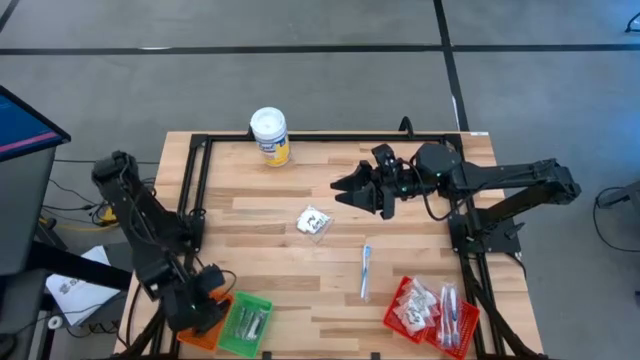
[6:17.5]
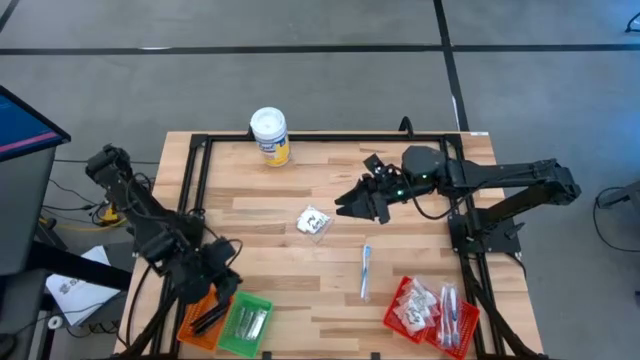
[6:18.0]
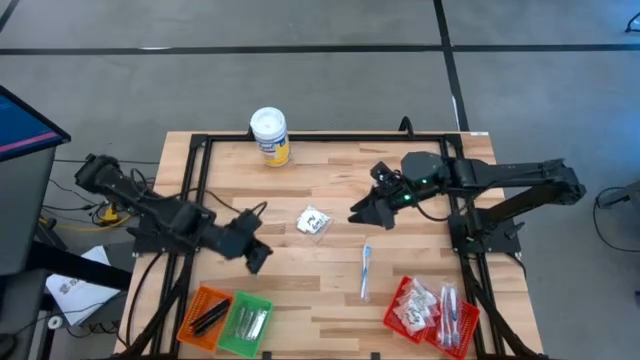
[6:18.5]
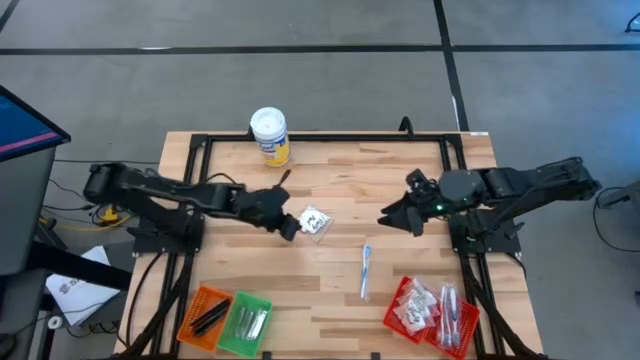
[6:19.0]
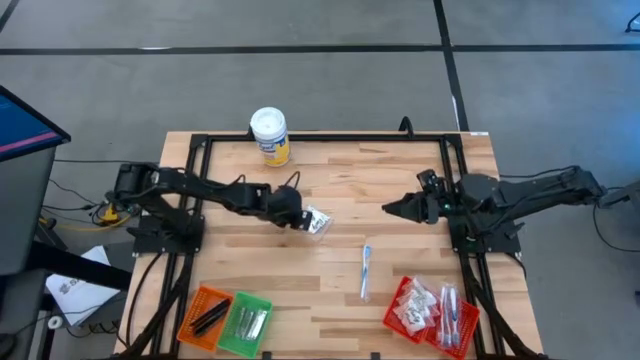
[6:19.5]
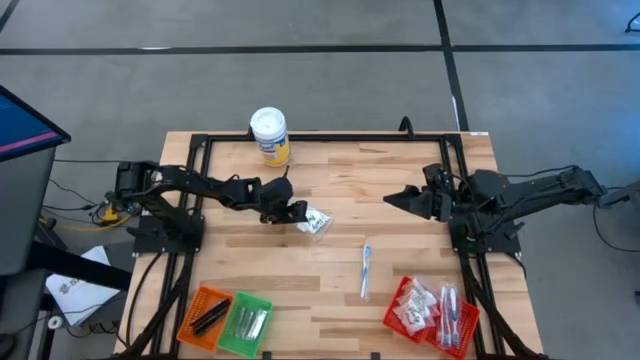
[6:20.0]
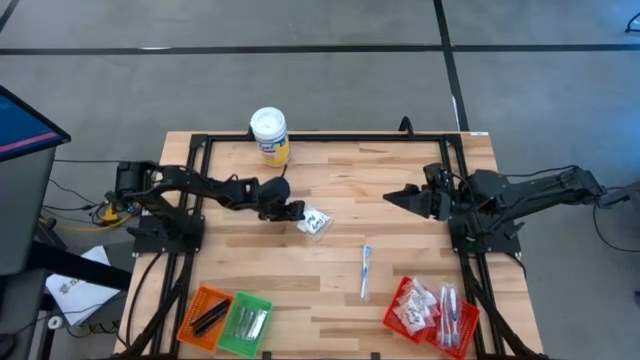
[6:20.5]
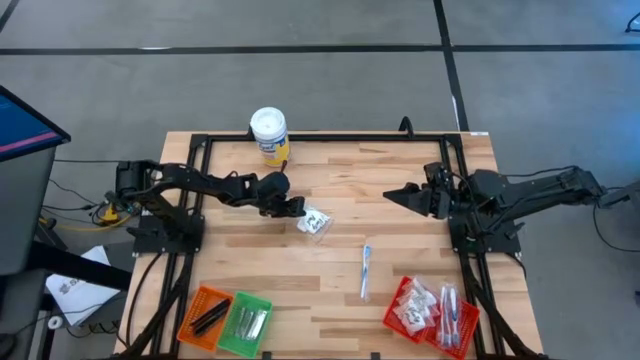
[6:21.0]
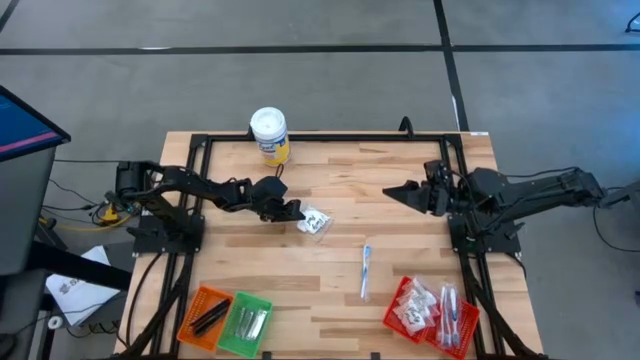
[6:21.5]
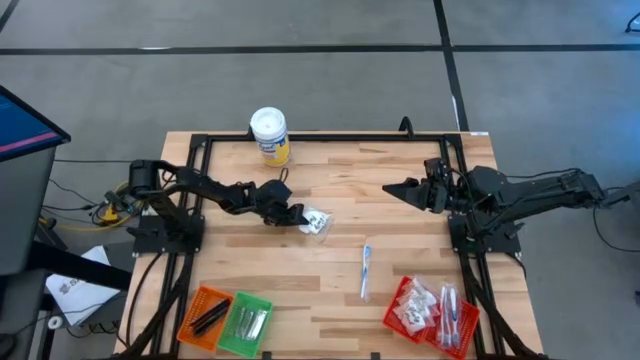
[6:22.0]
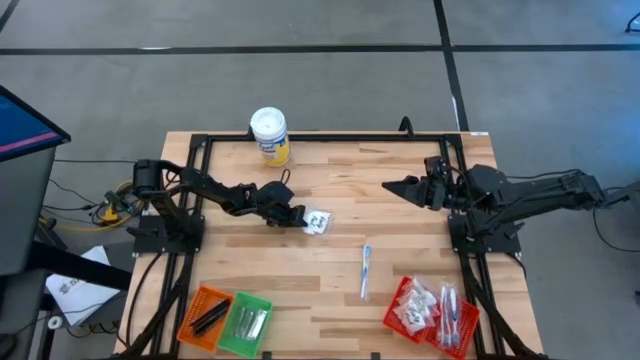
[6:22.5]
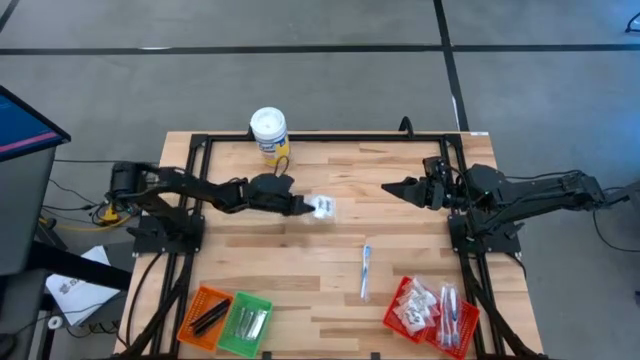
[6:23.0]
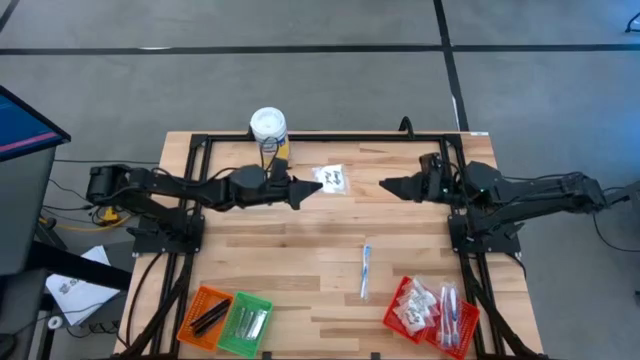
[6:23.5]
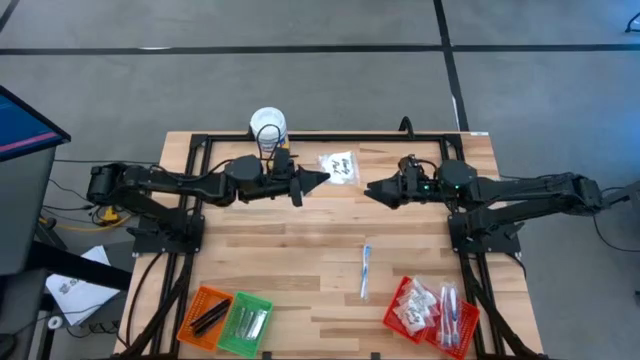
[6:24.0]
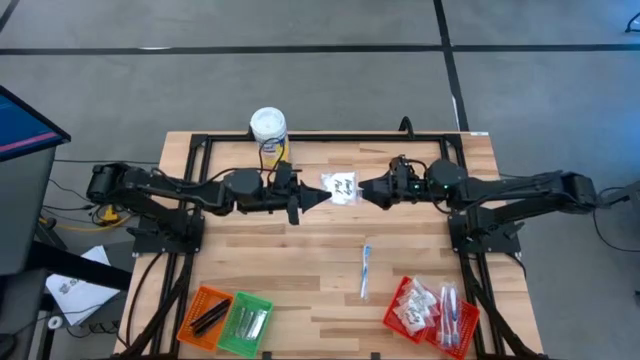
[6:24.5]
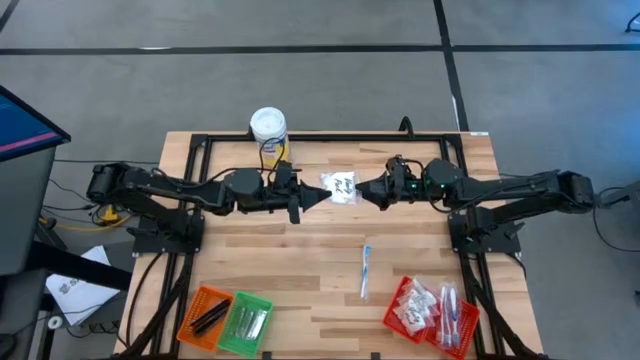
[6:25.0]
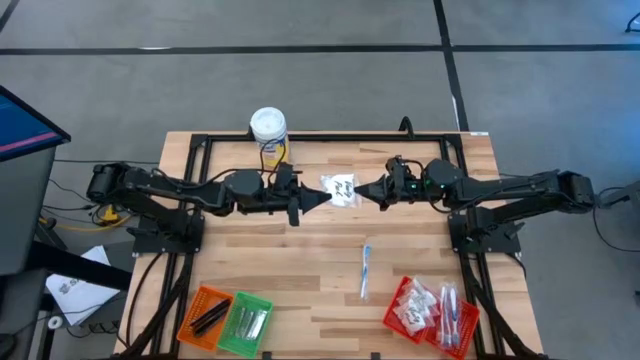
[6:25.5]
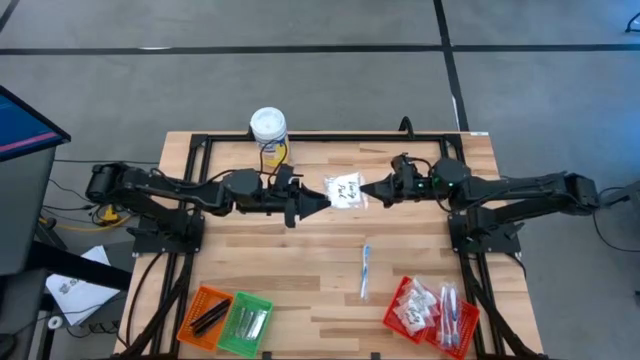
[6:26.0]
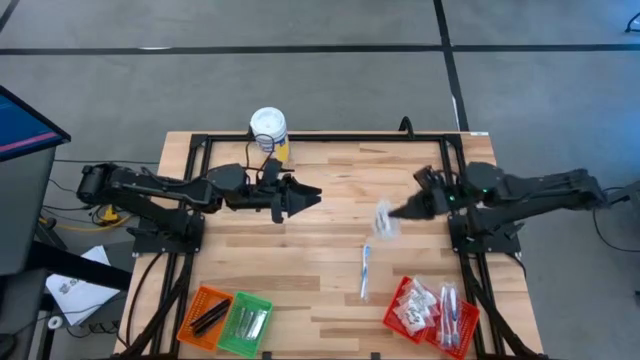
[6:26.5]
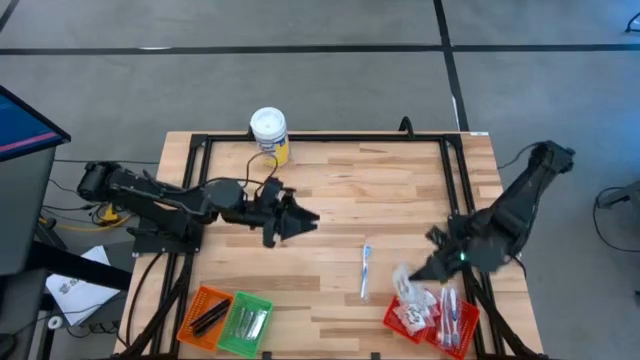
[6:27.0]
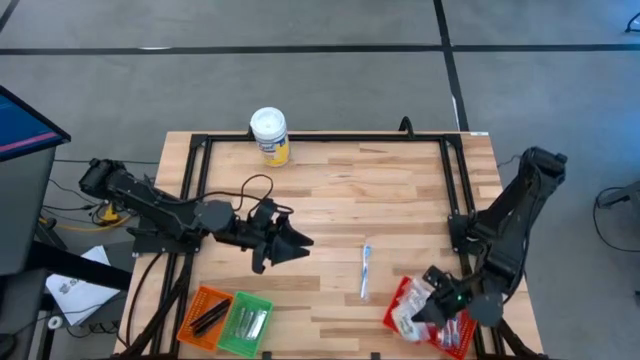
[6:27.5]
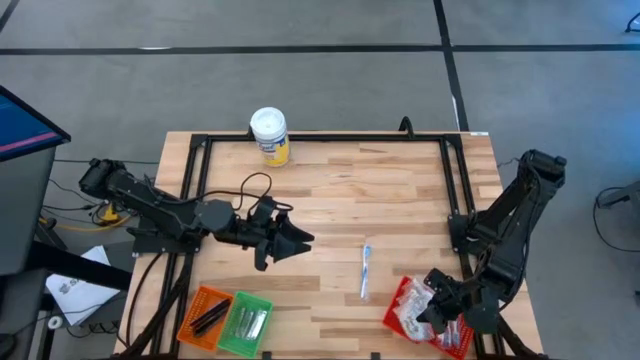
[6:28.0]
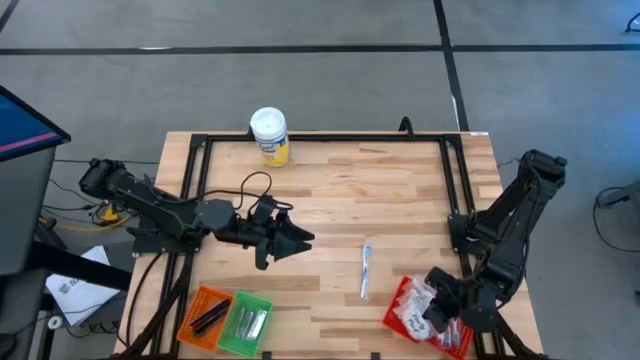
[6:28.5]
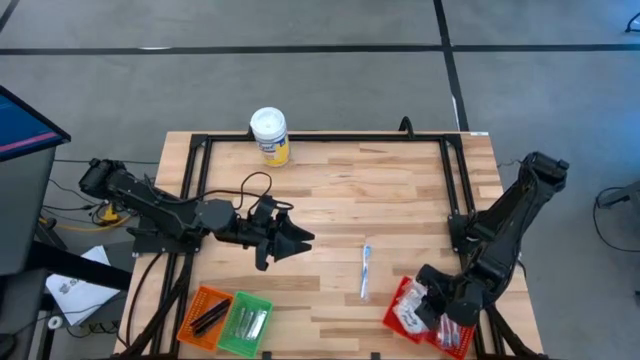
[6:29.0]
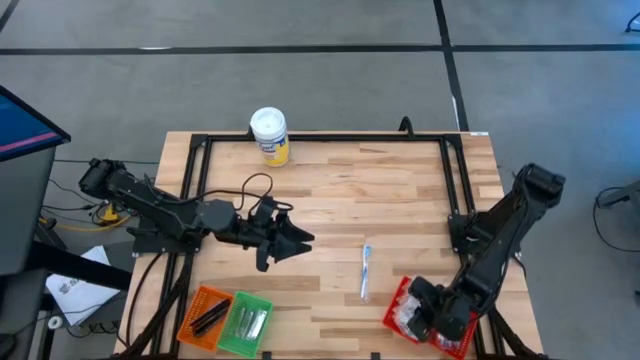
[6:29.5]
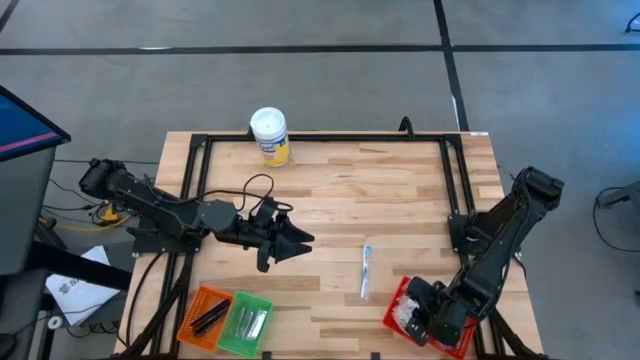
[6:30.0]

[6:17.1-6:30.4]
Task: Pick & Place Travel size toiletries
Put the cotton pods into the left red basket
